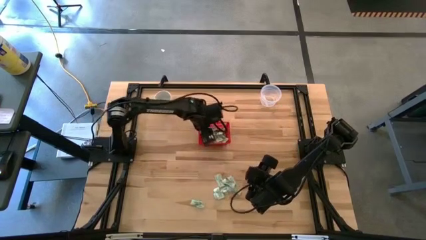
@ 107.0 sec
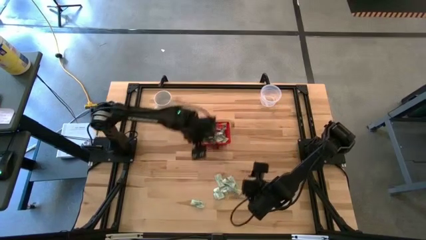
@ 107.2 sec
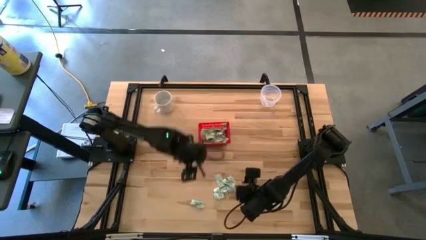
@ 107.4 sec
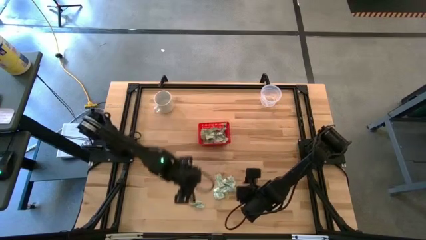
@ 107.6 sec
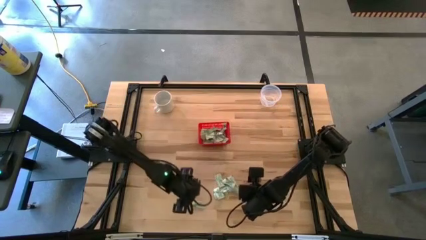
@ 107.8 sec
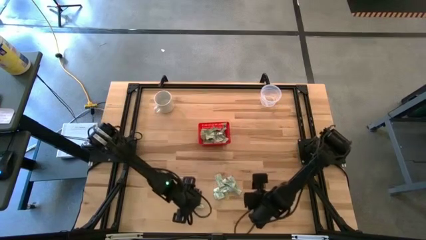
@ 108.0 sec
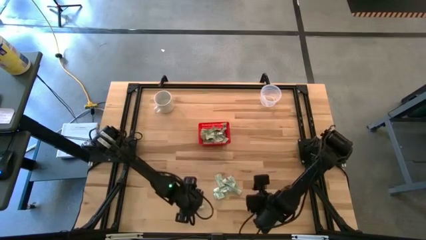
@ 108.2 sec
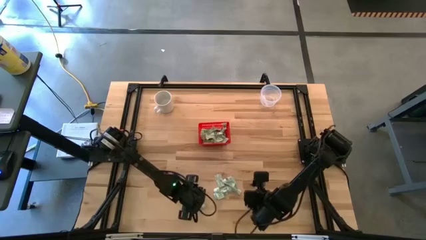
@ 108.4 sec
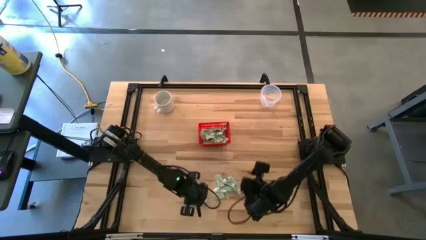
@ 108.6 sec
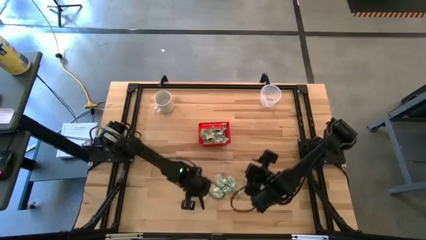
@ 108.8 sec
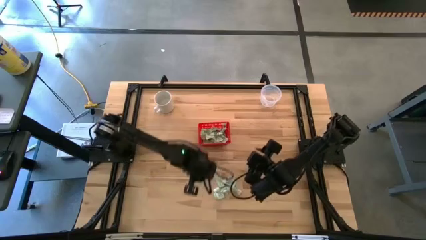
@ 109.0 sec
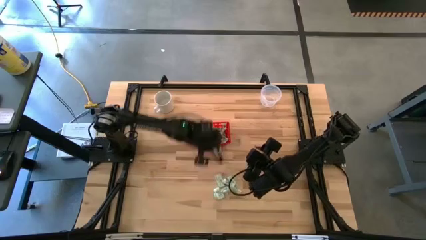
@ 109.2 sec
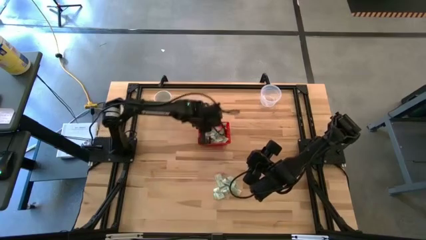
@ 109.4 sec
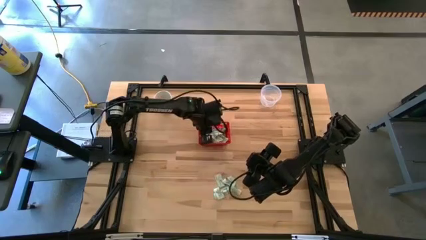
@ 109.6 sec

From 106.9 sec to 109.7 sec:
Task: Pick and place items into bin
Put the stevia packet into the red bin

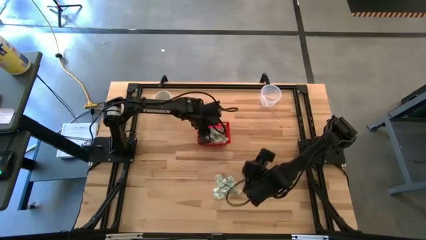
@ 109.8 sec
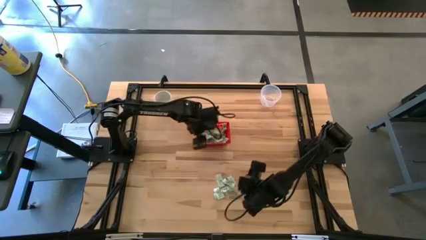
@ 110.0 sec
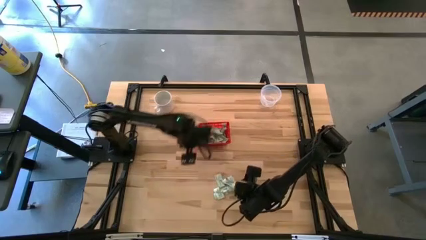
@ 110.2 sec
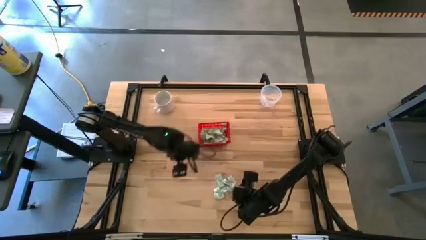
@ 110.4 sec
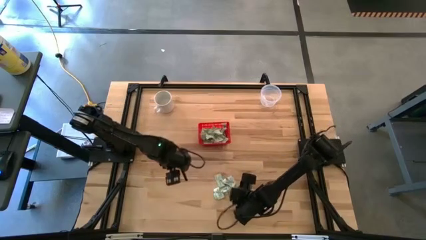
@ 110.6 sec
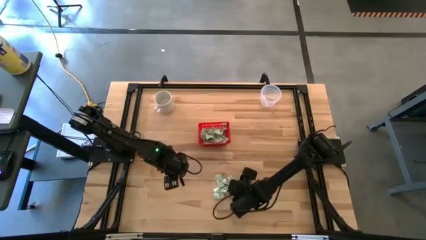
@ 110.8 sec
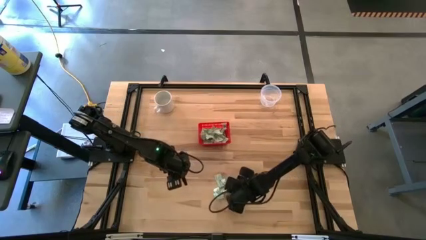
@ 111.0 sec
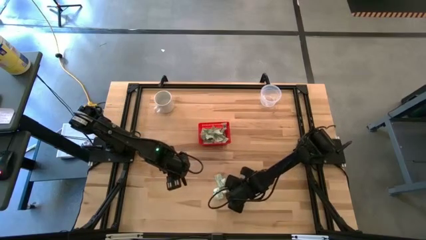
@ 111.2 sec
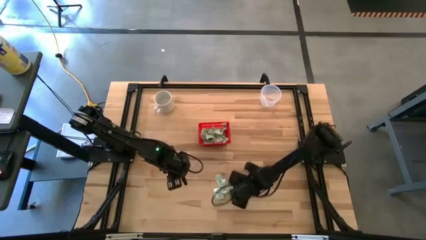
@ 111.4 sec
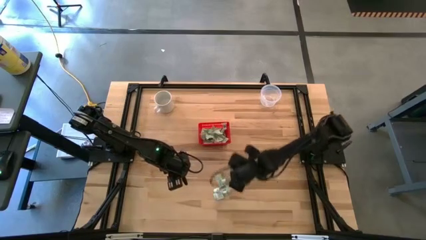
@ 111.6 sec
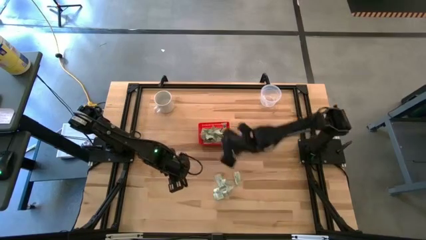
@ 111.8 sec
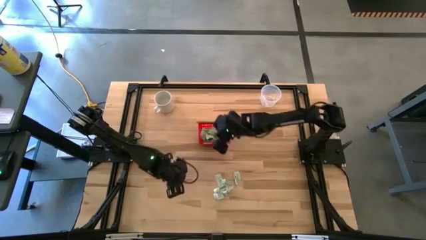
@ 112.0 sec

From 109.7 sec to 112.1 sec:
Put the stevia packet into the red bin

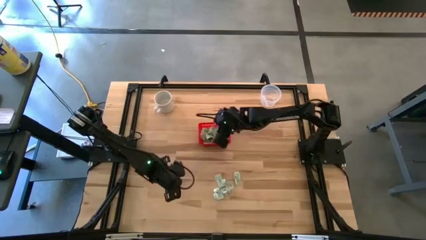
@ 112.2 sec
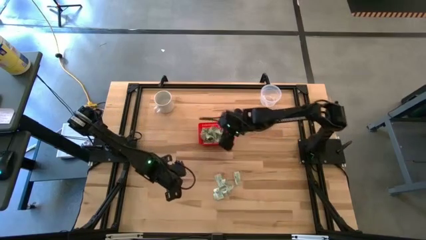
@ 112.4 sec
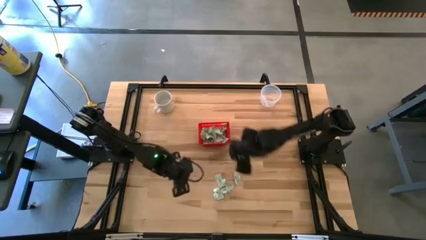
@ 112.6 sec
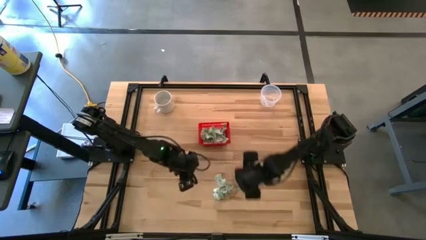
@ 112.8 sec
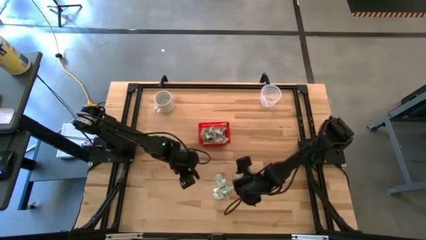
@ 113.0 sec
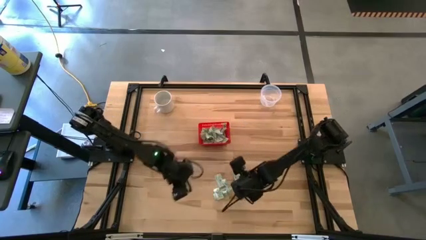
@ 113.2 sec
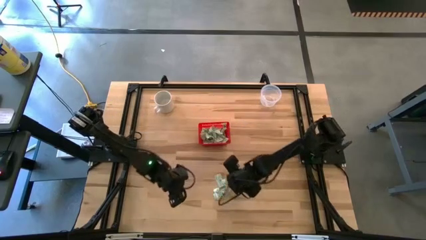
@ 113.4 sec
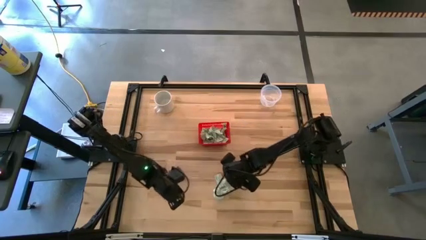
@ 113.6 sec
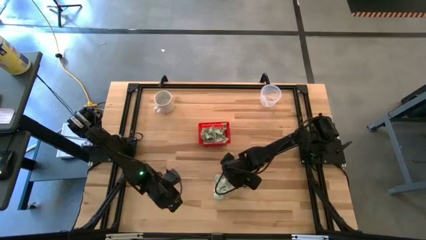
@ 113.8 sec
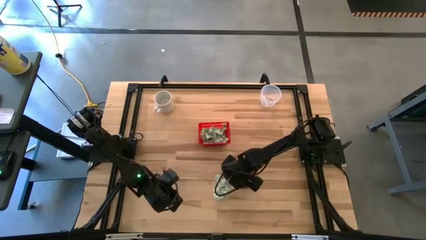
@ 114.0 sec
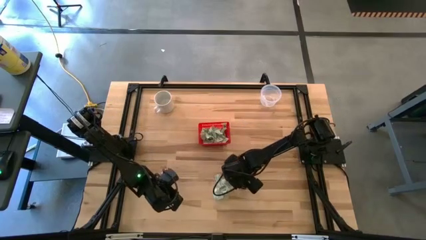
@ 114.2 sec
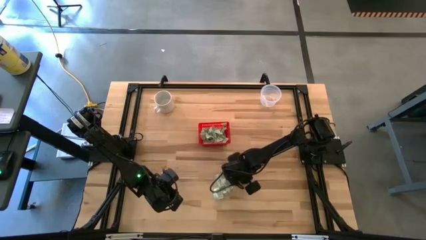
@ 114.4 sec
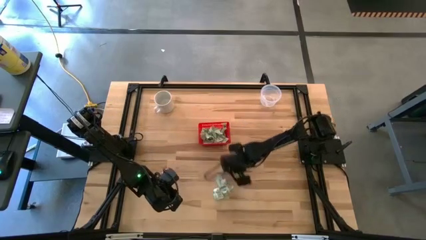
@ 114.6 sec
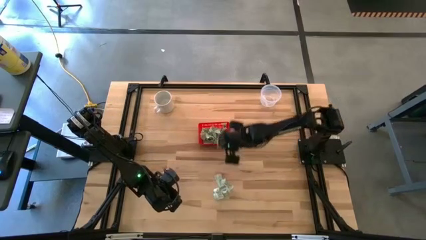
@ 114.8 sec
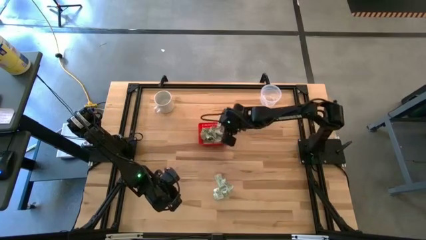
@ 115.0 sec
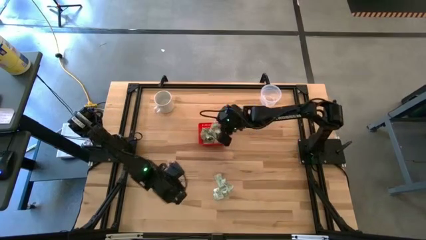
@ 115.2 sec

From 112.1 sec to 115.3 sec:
Put the stevia packet into the red bin

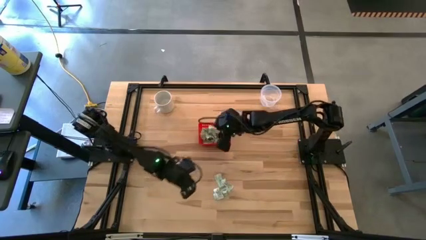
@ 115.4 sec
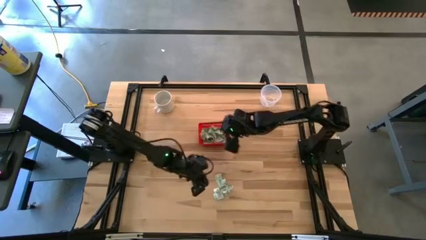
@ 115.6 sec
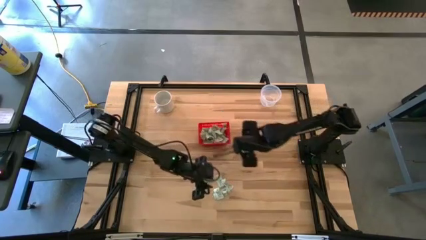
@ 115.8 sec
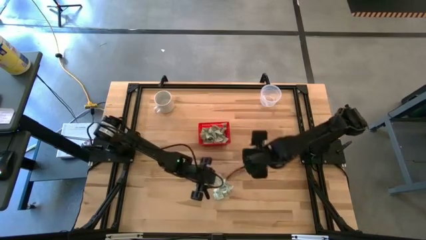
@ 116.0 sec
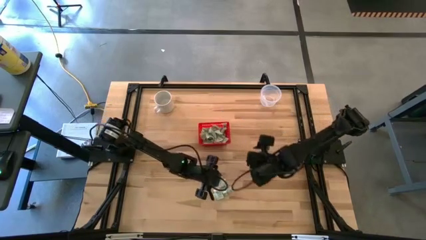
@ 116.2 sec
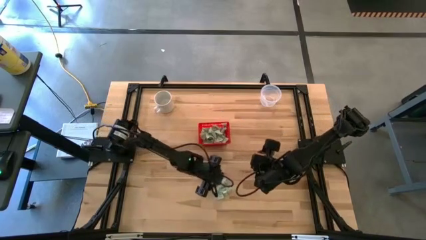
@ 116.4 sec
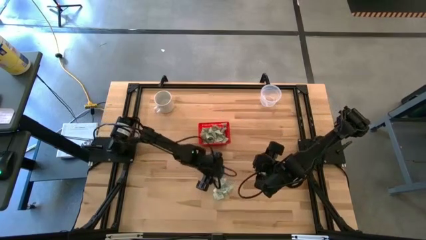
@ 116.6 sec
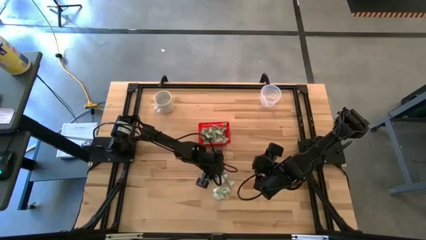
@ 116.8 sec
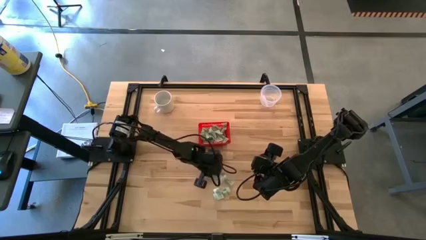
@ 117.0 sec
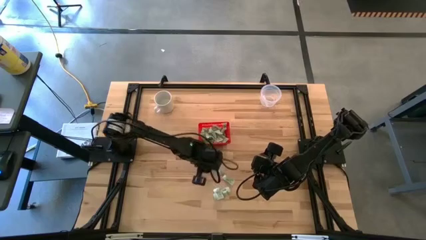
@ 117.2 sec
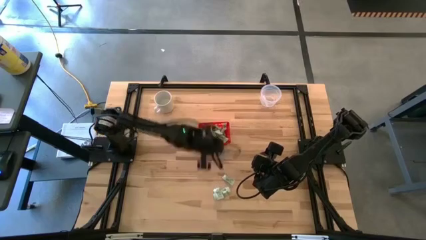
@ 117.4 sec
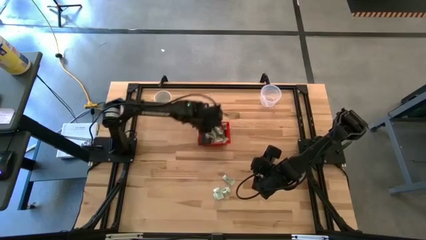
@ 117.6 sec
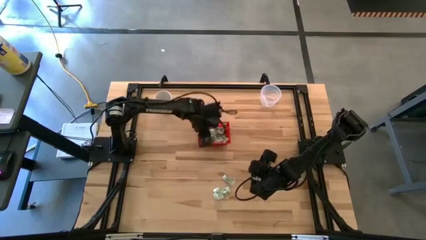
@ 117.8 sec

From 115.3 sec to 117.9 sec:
Put the stevia packet into the red bin

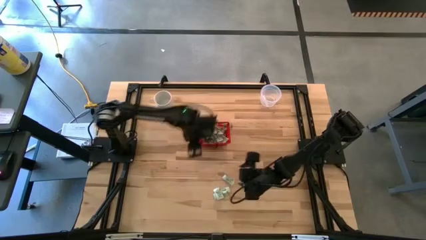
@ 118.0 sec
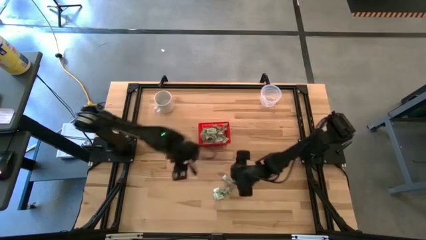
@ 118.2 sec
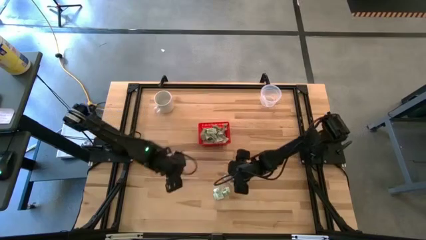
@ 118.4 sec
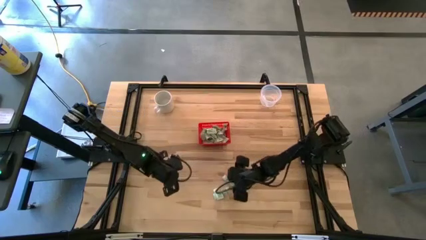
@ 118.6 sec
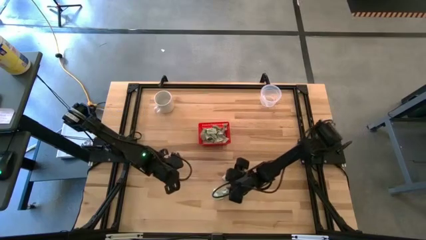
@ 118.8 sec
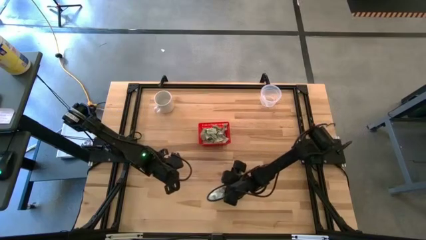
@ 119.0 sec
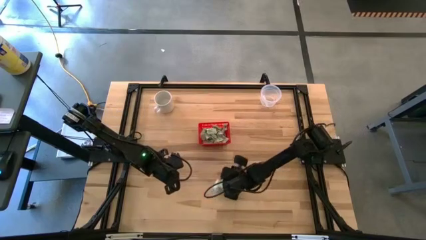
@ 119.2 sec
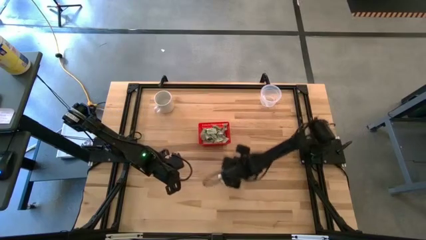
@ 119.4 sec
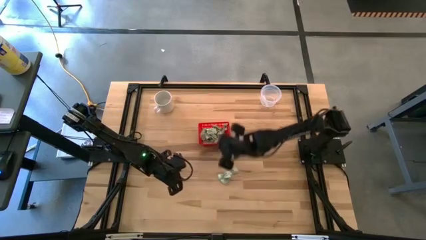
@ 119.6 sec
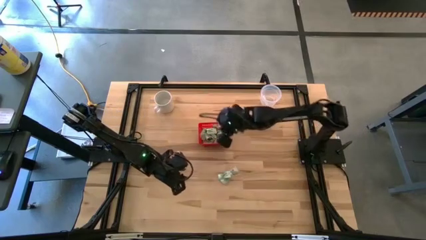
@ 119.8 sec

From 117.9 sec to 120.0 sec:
Put the stevia packet into the red bin

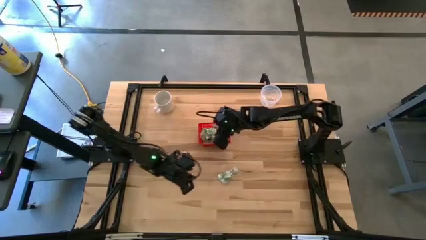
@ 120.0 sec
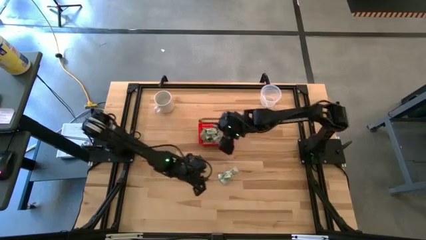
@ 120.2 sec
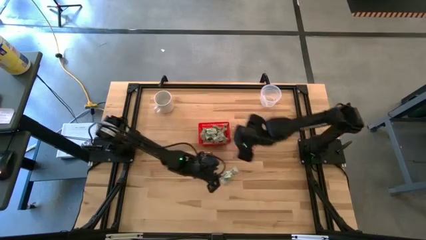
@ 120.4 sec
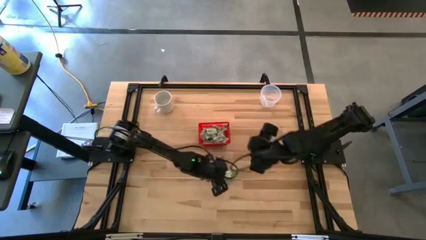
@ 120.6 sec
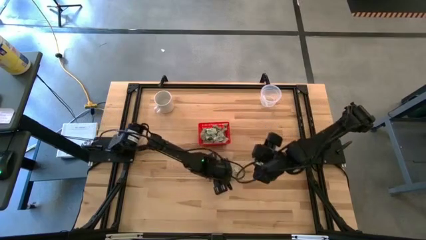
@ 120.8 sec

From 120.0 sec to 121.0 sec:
Put the stevia packet into the red bin

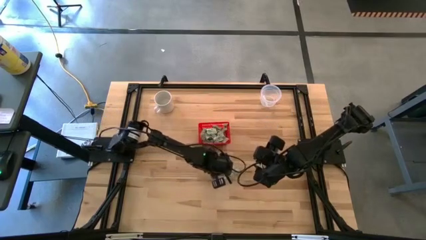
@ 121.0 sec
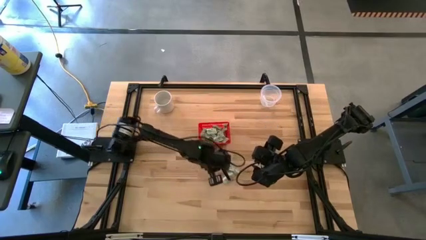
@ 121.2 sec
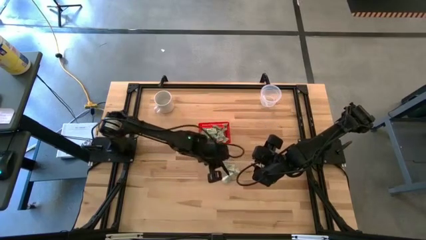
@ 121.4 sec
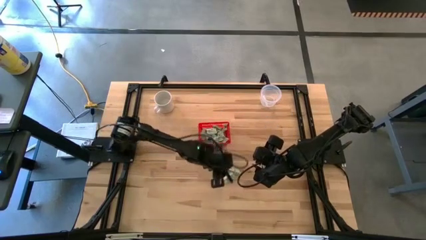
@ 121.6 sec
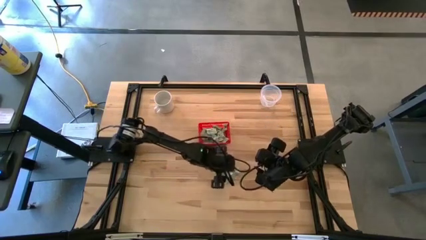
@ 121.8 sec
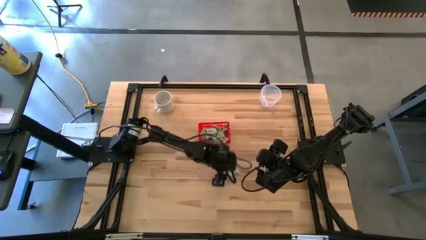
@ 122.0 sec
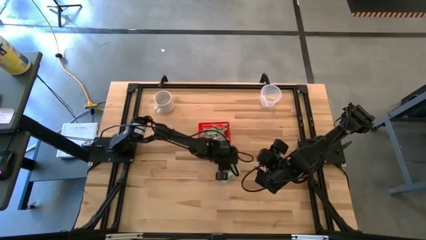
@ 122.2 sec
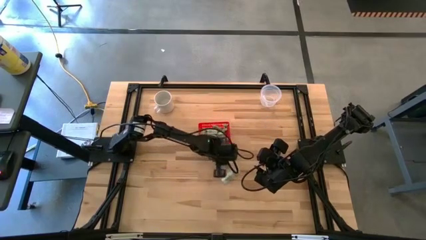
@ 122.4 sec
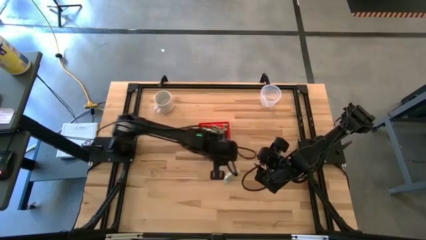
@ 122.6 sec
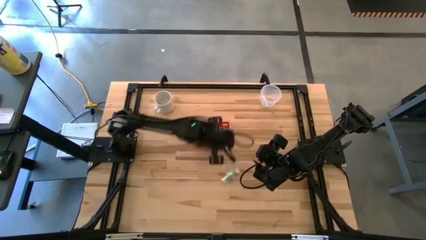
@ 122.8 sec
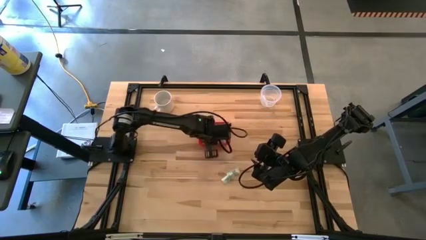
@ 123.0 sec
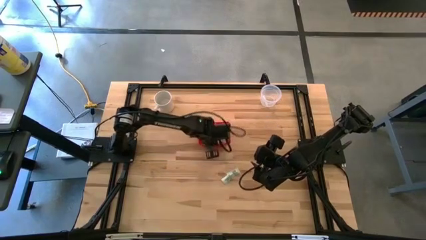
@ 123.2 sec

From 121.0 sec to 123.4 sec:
Put the stevia packet into the red bin

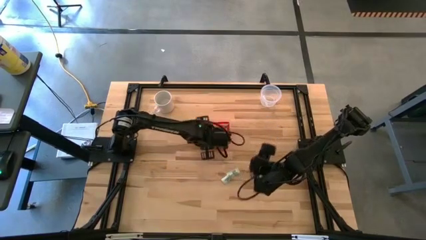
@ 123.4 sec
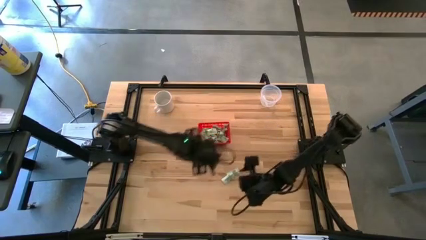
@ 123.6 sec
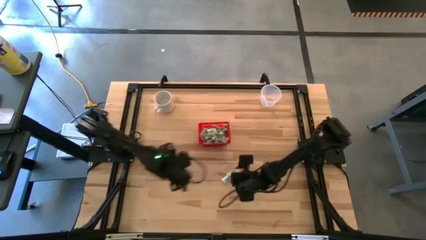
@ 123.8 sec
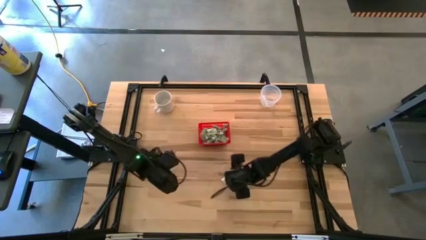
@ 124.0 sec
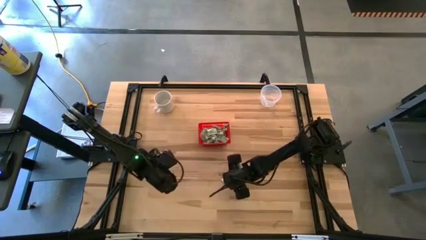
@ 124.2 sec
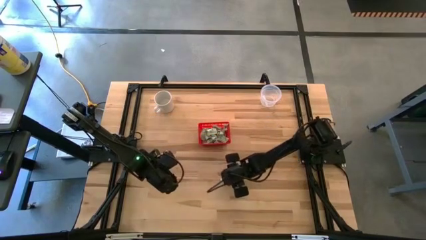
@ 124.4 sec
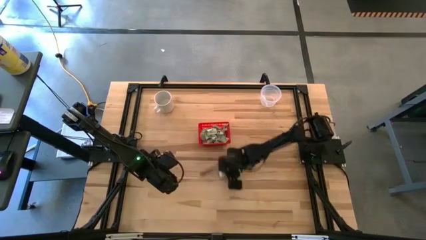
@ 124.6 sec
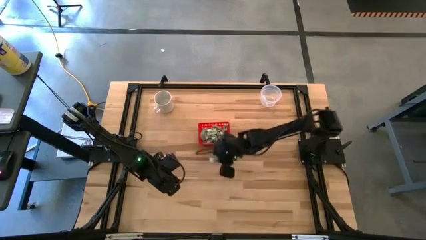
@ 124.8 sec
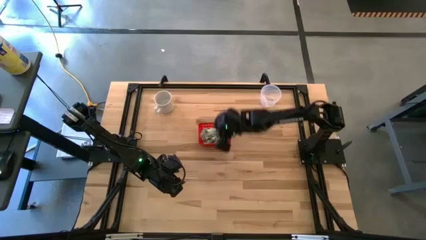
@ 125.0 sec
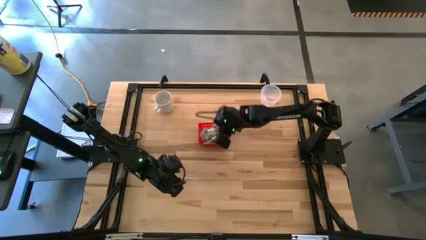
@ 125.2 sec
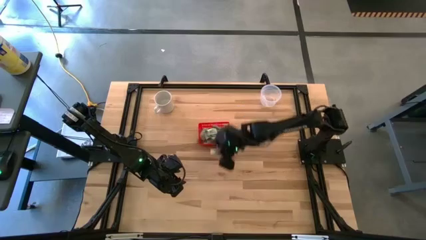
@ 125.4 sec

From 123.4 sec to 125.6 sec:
Put the stevia packet into the red bin
